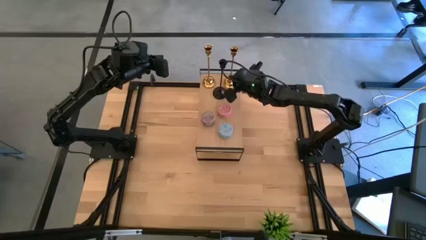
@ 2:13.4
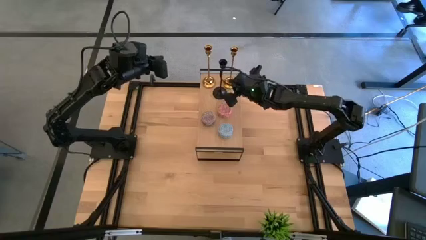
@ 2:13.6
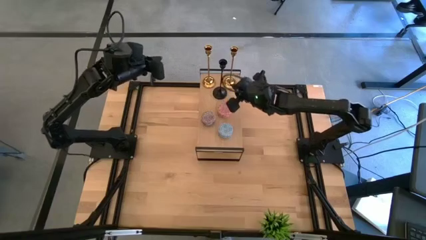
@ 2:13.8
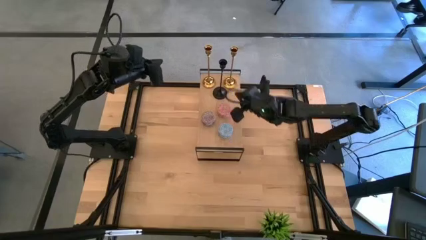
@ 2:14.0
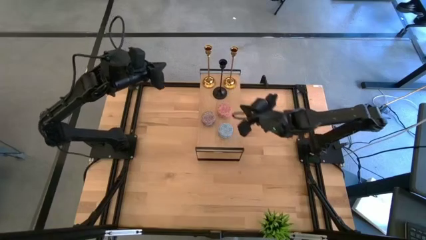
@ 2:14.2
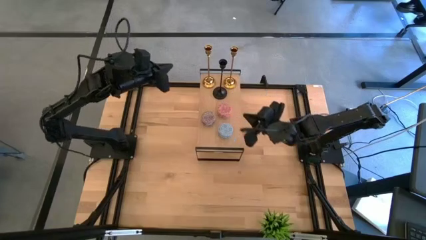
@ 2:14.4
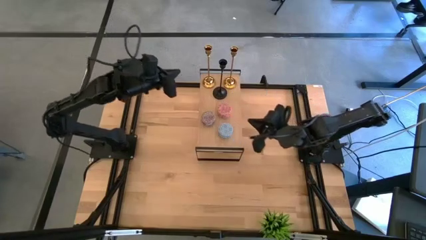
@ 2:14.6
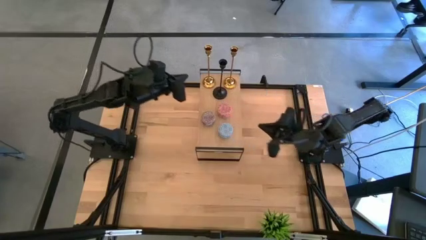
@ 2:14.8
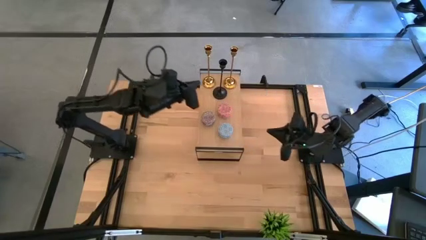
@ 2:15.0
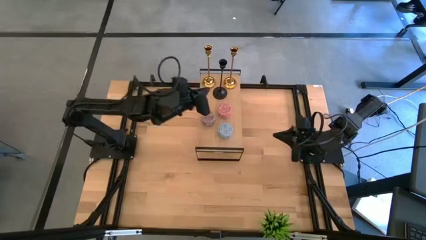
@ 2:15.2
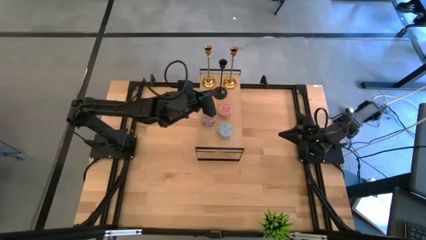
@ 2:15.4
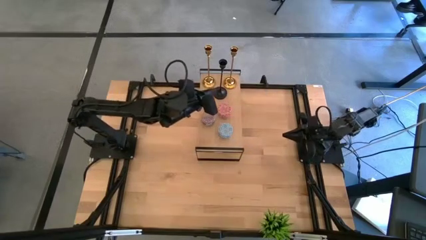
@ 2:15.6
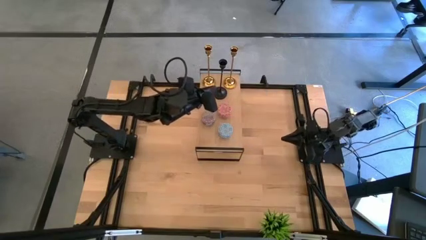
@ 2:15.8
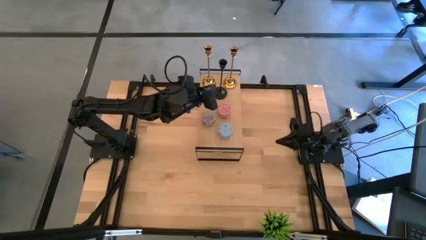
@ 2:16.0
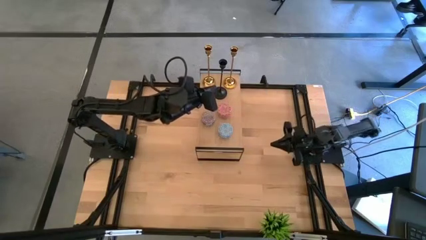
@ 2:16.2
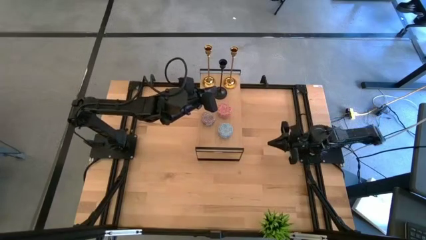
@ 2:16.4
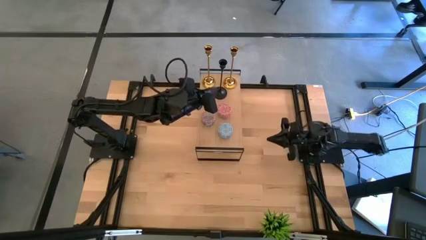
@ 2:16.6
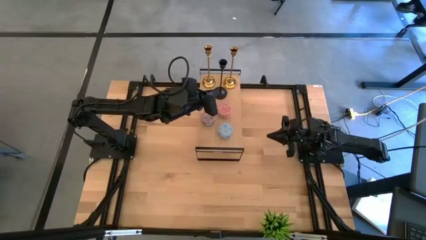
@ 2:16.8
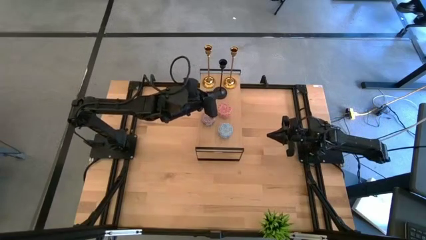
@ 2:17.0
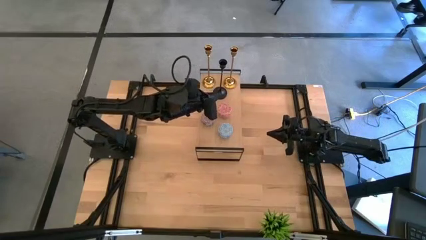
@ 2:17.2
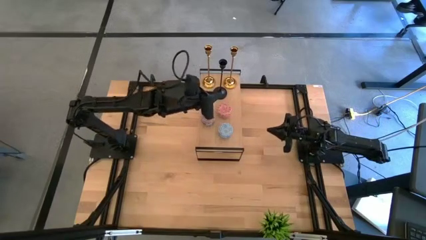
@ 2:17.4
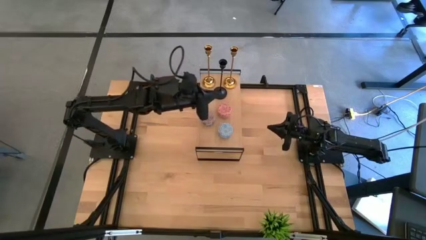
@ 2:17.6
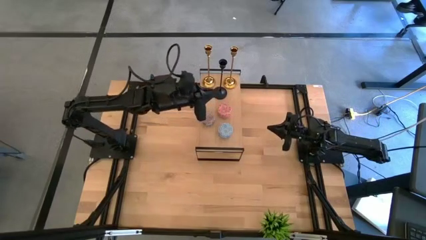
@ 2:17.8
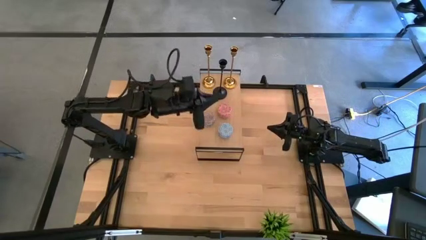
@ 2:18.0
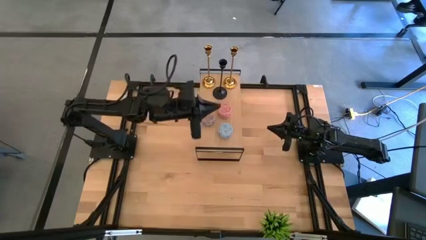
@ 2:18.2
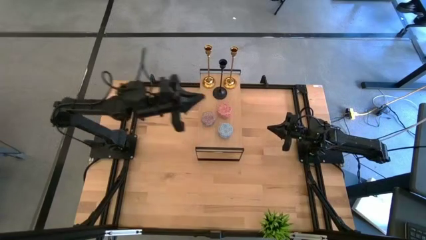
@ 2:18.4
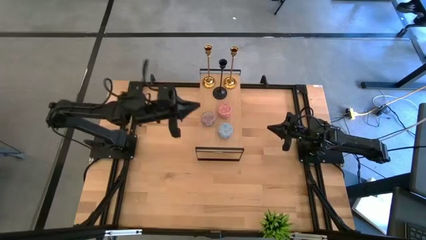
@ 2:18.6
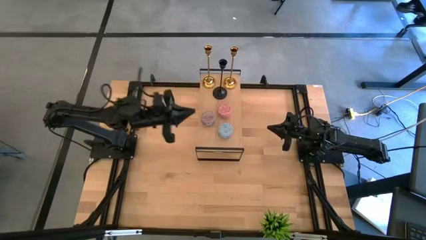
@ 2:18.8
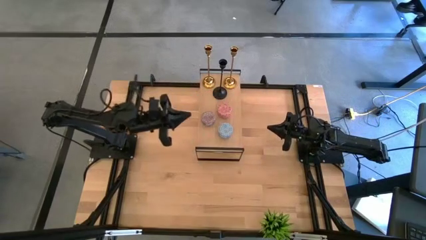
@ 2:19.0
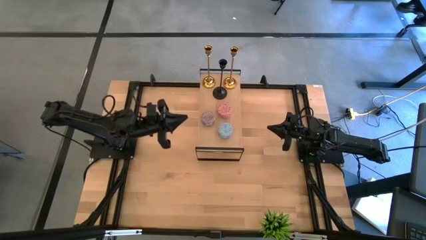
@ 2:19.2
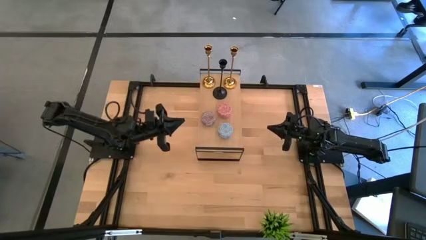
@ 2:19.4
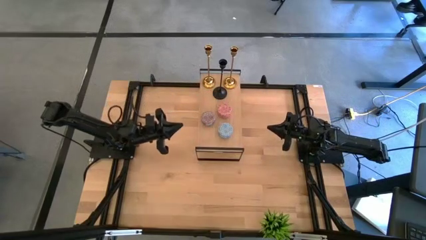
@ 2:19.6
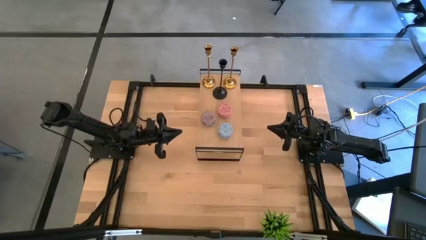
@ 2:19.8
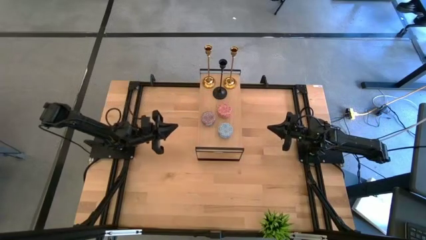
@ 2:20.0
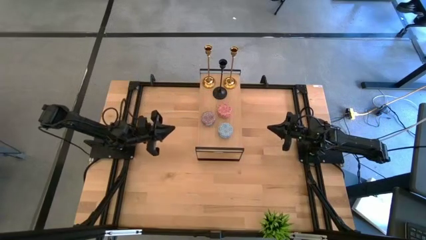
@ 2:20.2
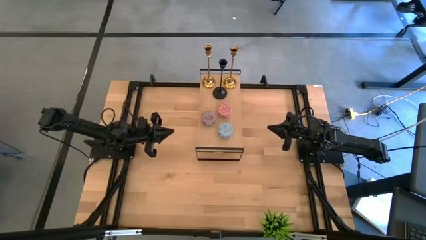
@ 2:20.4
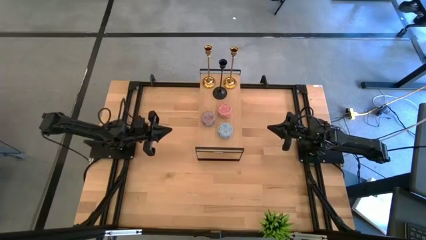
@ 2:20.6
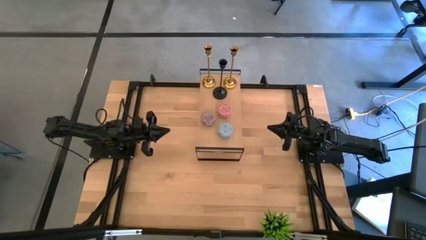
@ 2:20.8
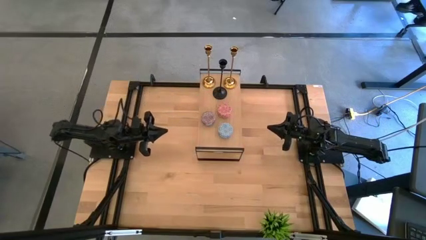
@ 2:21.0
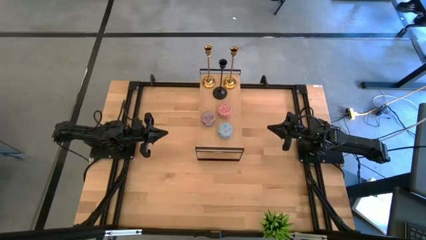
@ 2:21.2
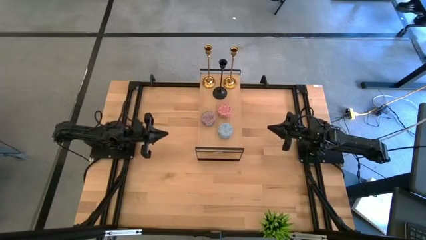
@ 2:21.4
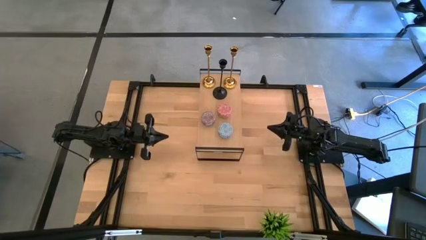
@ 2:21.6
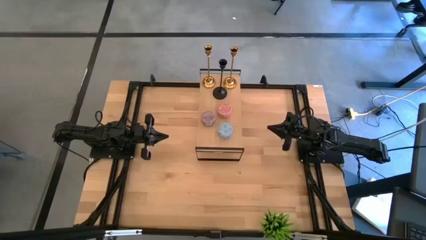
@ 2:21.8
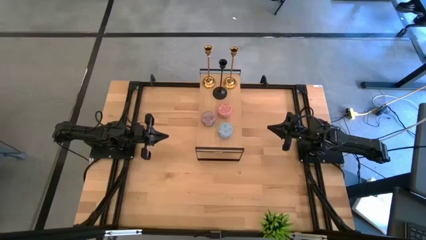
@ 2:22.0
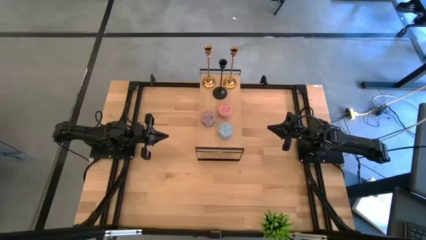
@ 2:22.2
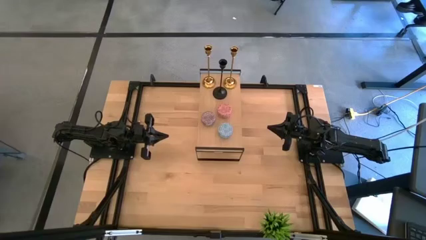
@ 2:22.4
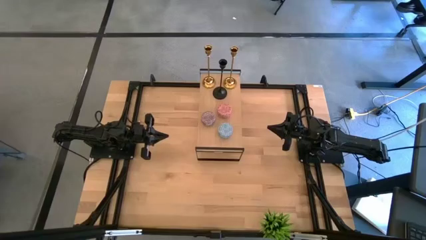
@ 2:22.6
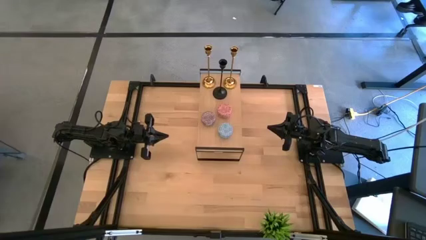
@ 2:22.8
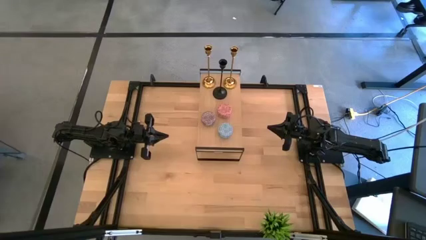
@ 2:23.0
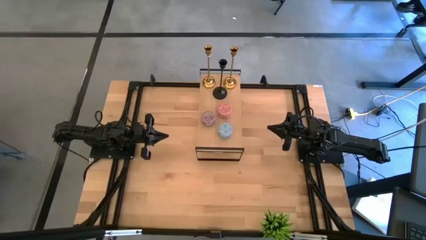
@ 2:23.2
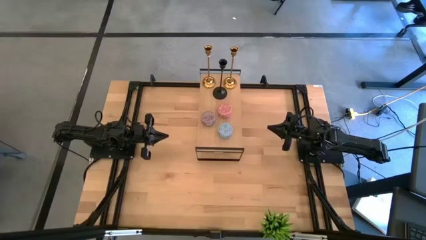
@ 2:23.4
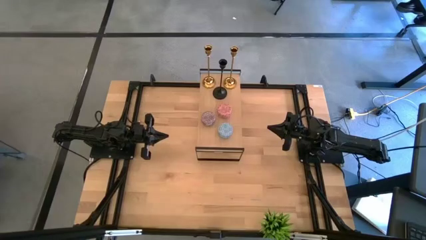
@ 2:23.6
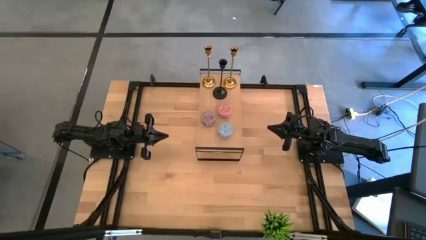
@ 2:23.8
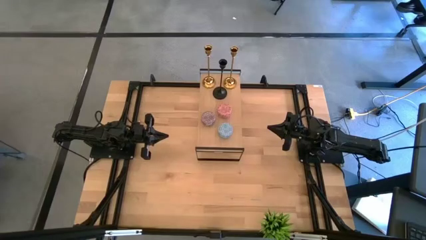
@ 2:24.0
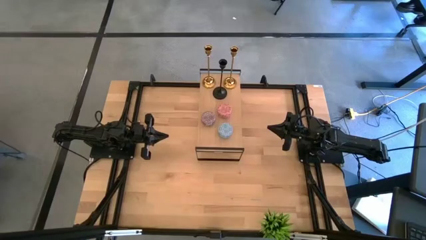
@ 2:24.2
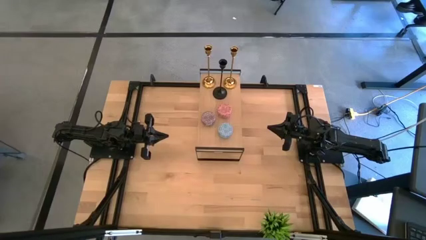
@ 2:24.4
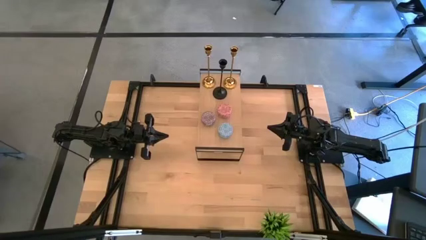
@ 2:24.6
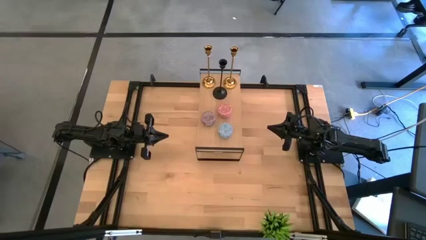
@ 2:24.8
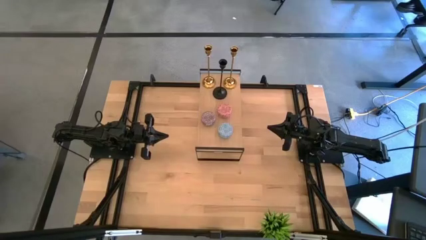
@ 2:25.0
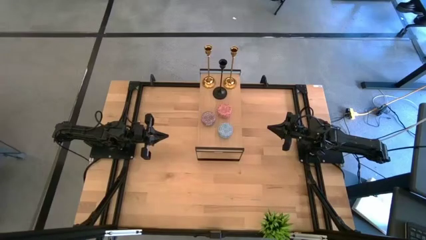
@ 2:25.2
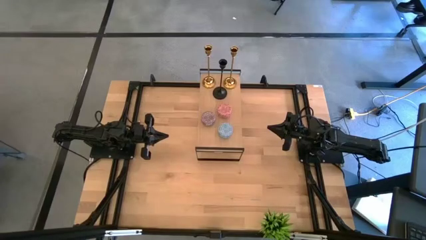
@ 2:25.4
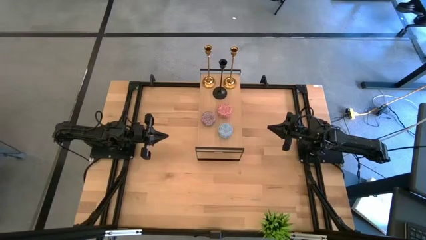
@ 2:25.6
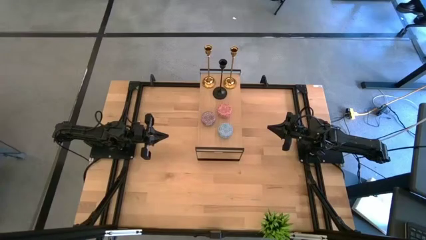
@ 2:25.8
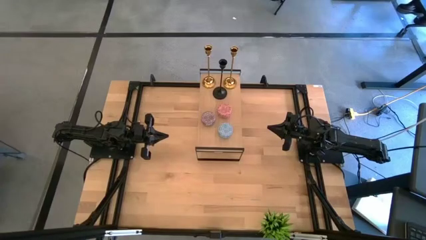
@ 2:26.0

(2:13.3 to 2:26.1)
Task: Pick & Place candle stick holders
Return to Home Position

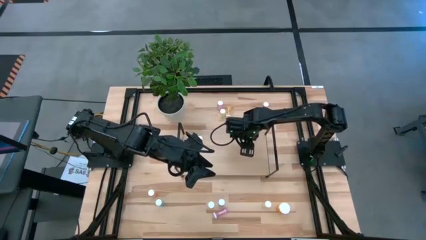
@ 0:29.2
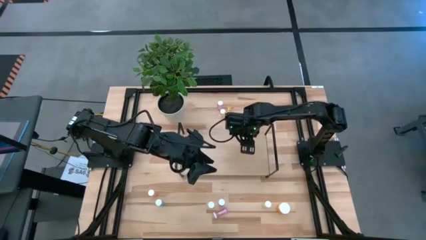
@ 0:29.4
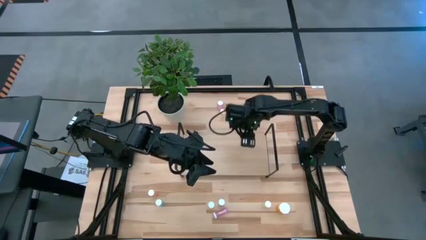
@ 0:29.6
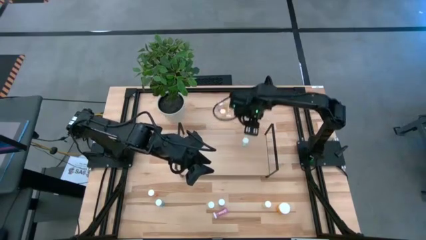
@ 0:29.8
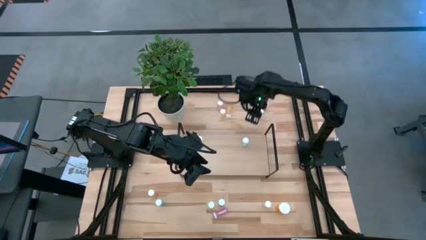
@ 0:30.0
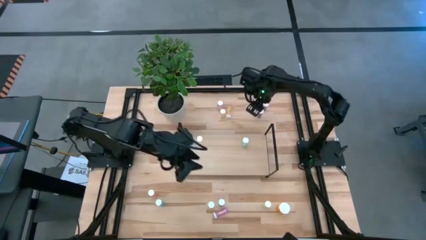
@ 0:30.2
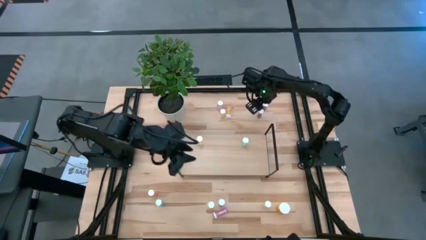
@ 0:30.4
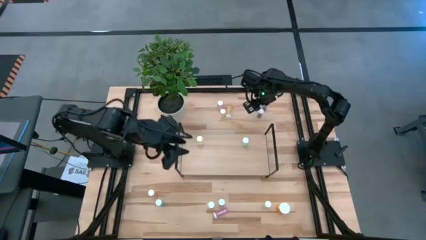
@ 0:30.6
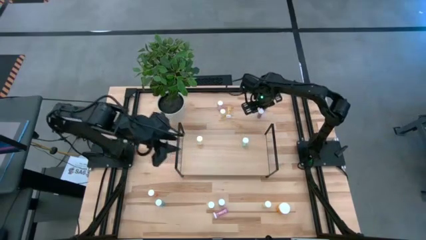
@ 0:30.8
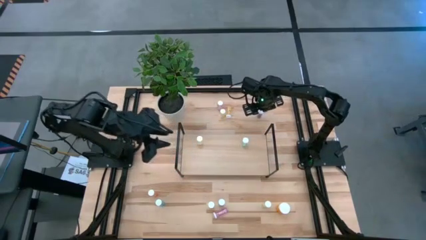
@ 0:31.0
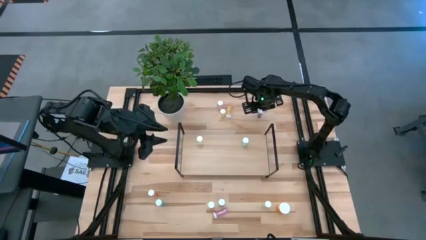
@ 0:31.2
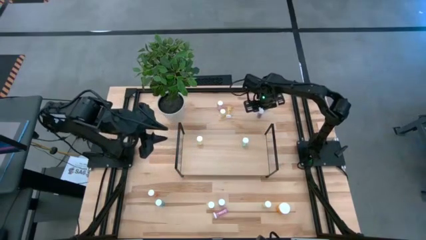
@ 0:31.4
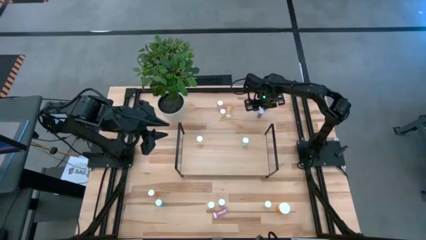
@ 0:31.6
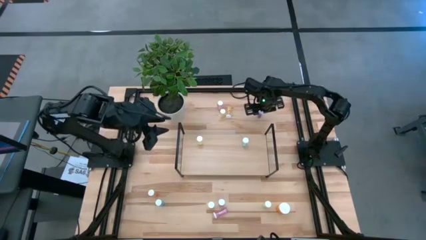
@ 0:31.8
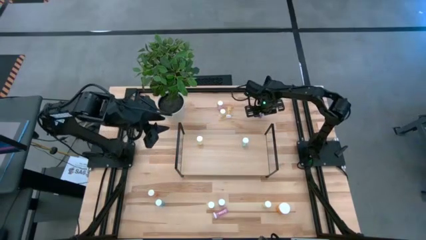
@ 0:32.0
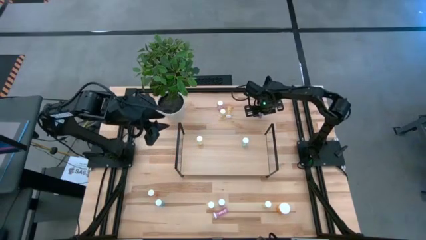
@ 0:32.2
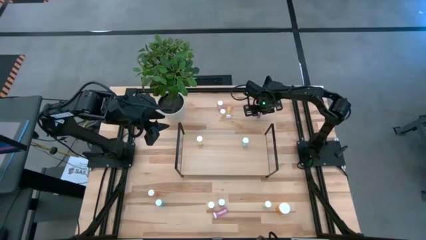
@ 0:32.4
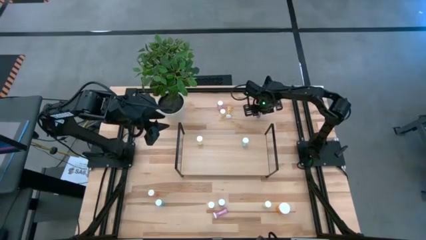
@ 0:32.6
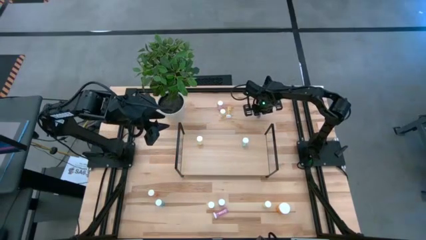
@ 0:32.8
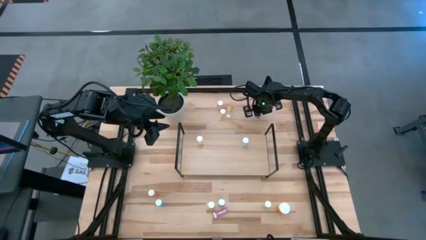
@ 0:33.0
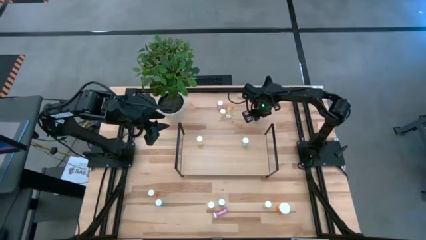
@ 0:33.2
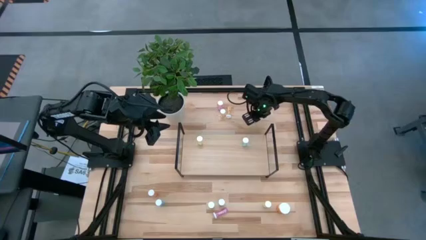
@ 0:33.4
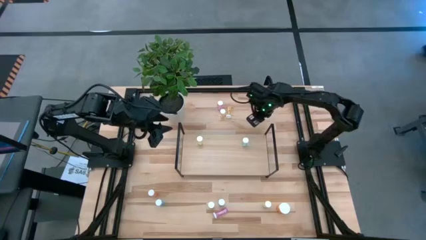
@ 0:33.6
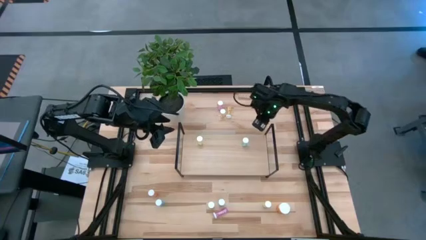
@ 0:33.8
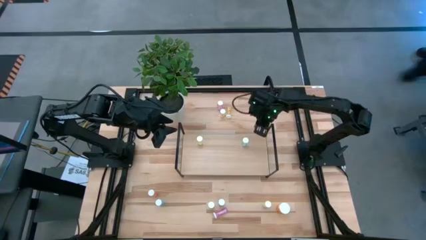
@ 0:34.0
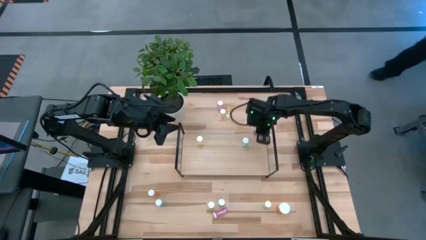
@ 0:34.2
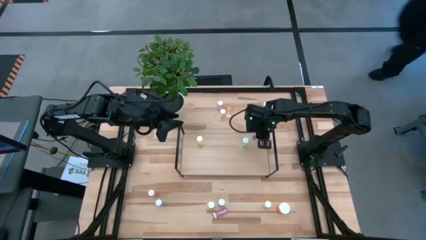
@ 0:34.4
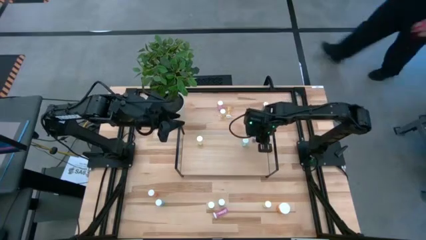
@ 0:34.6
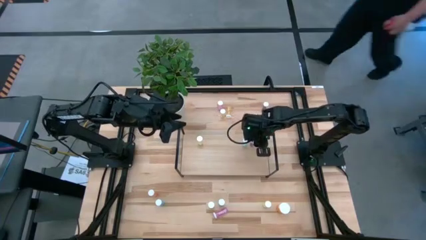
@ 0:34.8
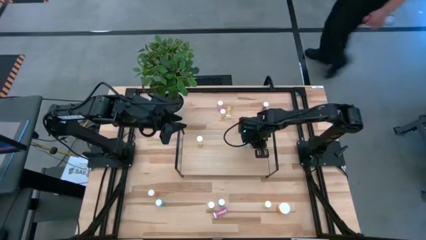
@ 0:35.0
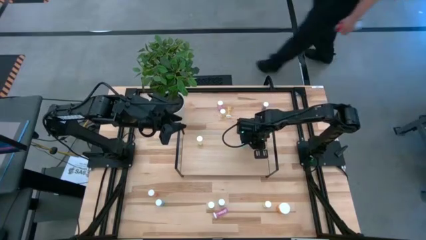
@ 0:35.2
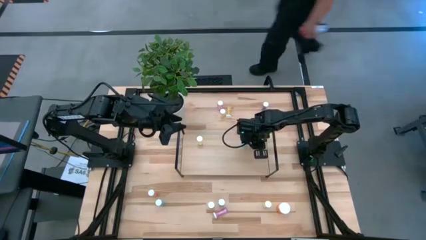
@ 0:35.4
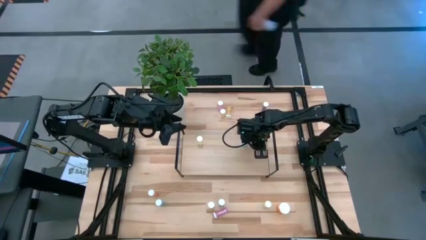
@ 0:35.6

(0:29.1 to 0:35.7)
Task: Pick and place medicine bottles onto shelf by color
Put the blue pill bottle on the shelf
